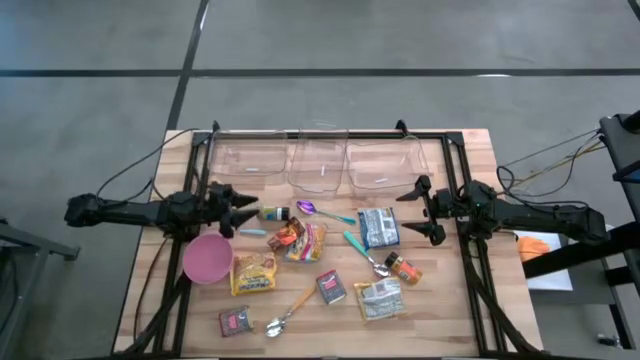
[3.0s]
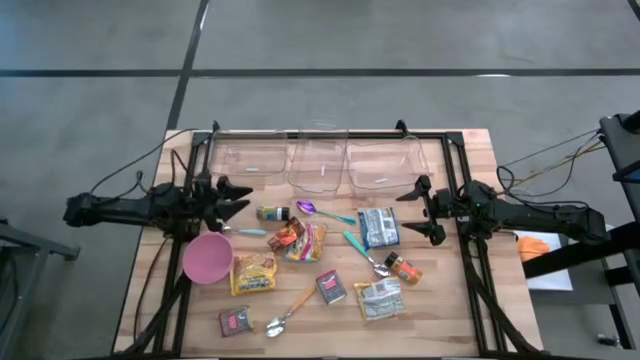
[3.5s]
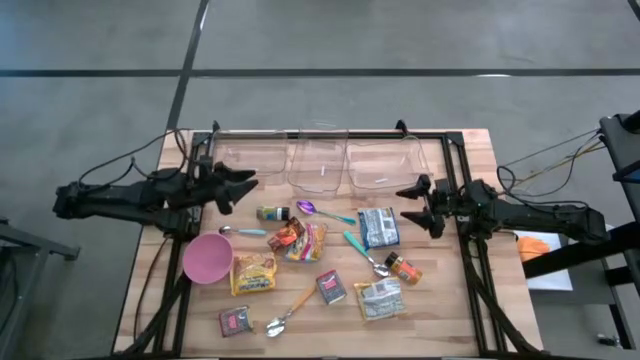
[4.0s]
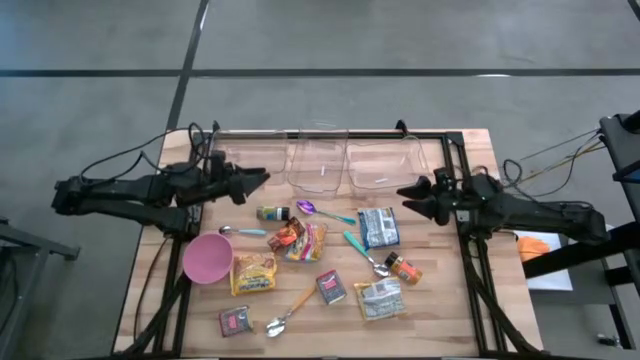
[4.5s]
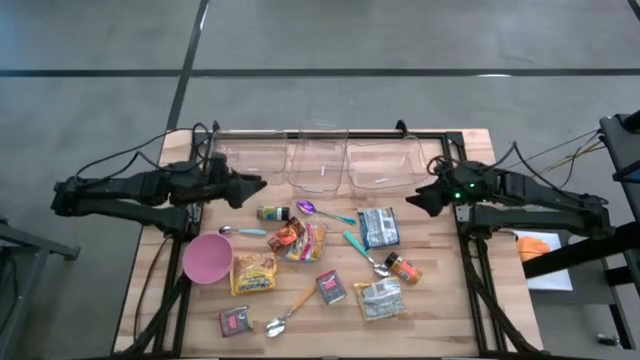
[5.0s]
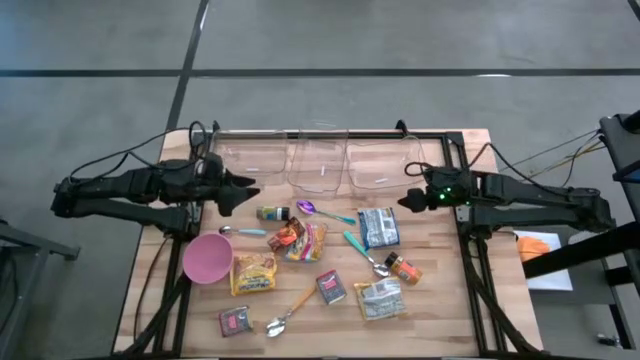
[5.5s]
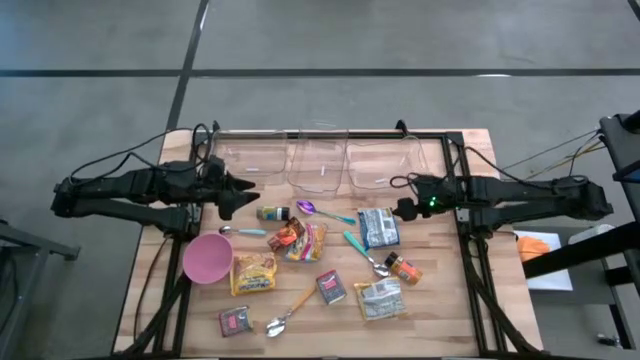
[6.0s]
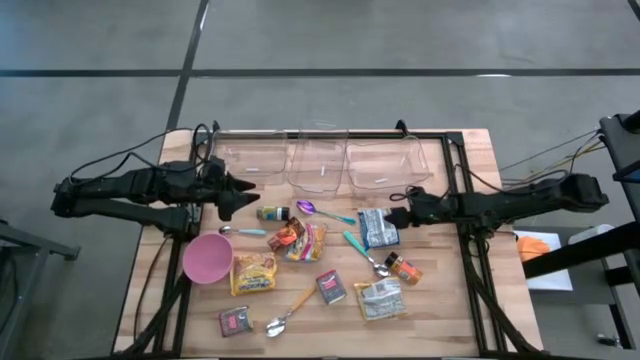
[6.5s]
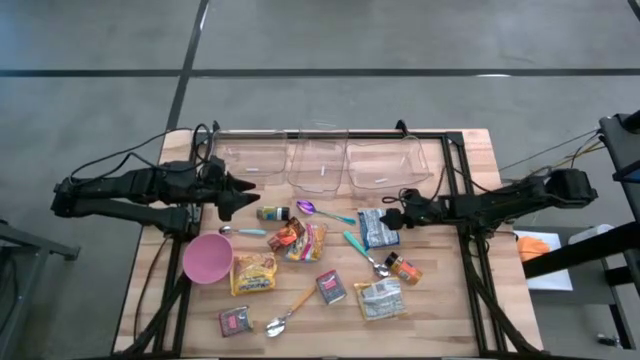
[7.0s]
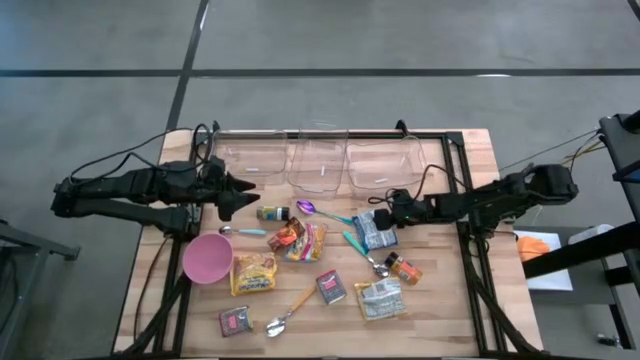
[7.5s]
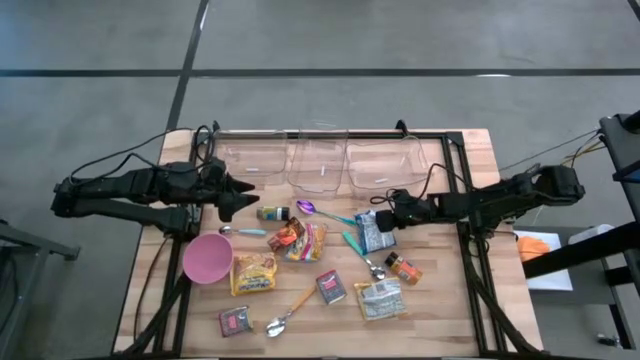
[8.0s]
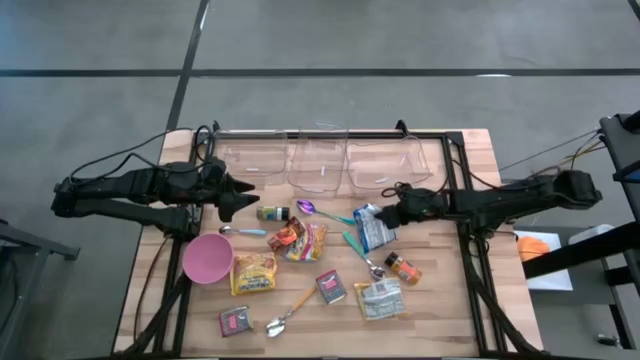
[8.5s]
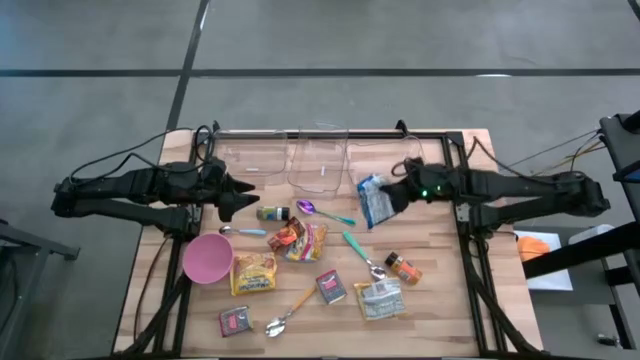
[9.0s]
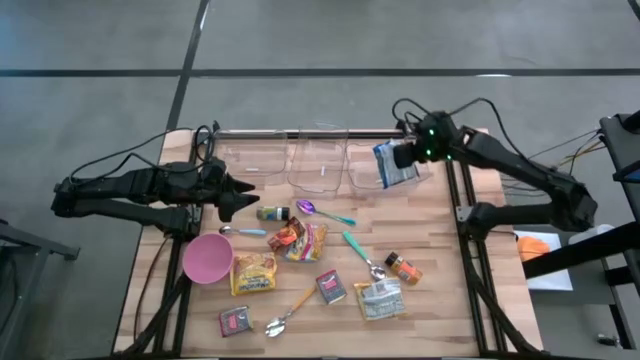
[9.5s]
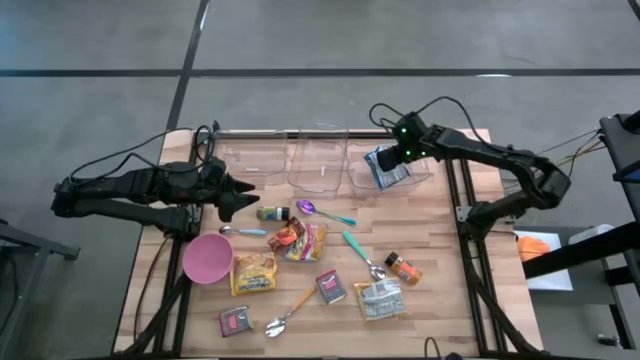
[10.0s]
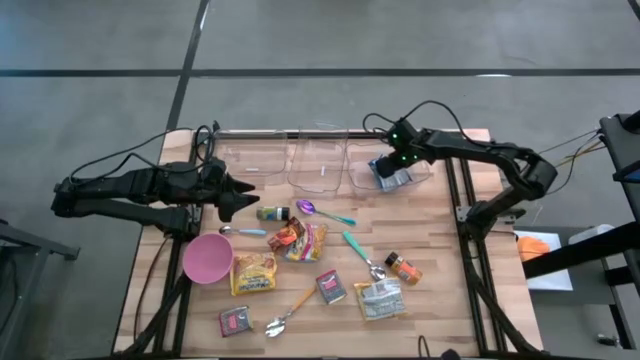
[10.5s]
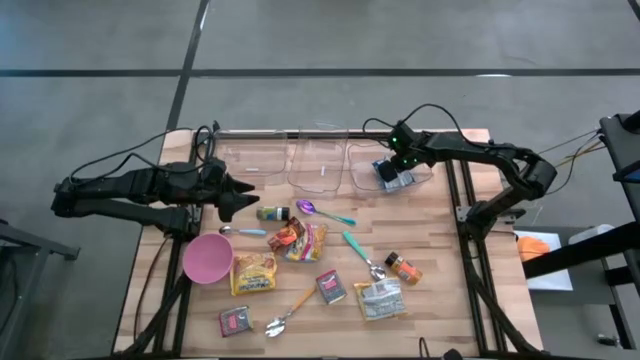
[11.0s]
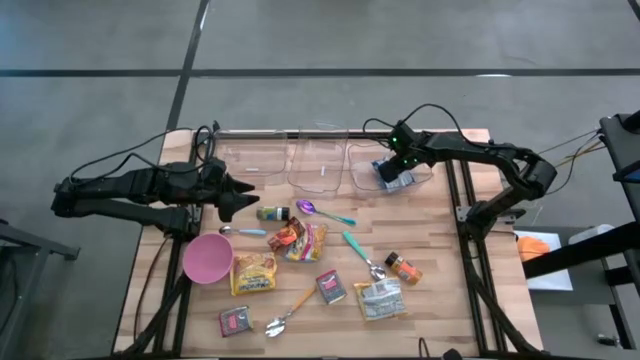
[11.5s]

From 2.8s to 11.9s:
Put the blue noodle pack into the right transparent bin

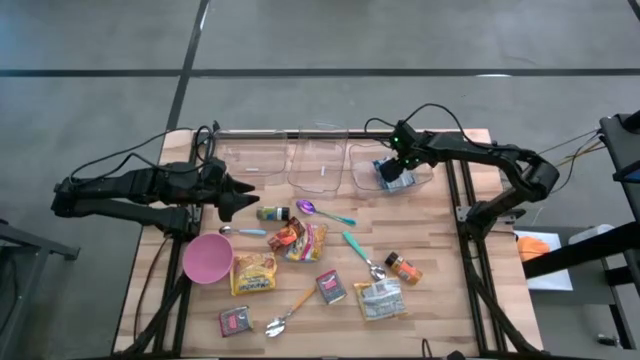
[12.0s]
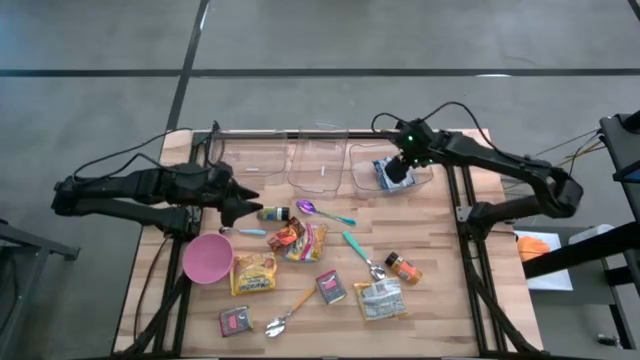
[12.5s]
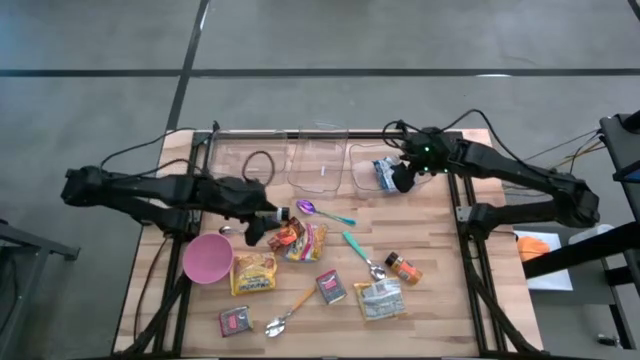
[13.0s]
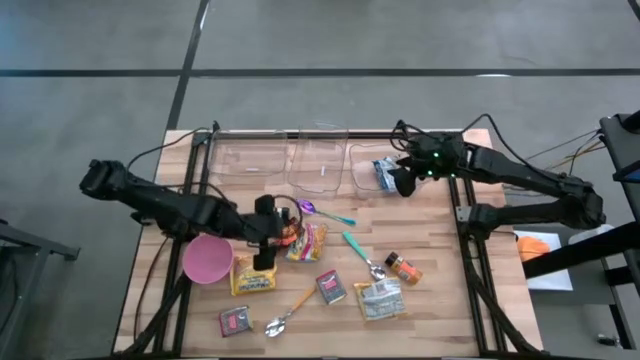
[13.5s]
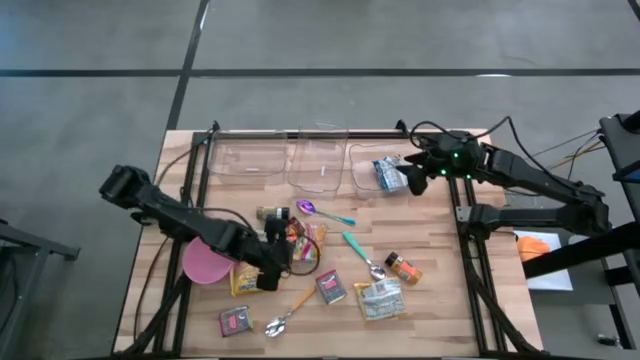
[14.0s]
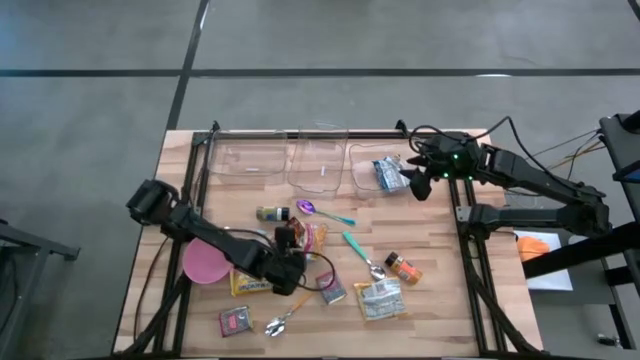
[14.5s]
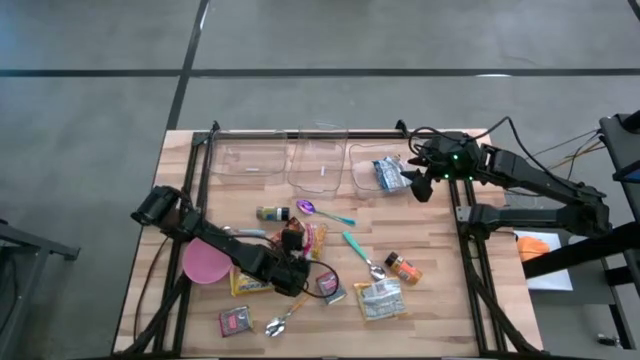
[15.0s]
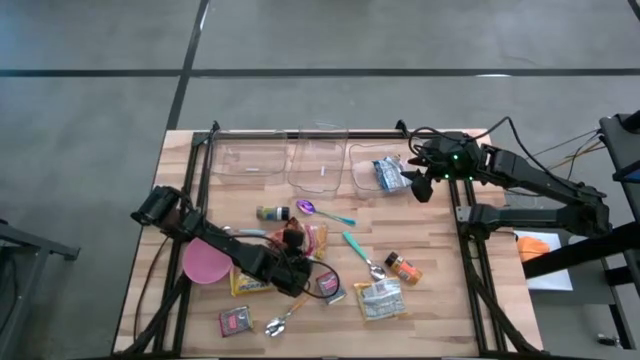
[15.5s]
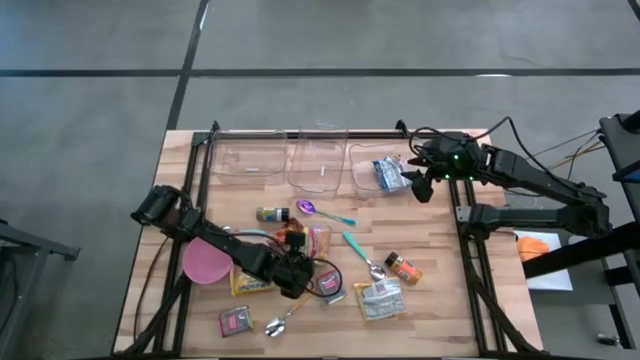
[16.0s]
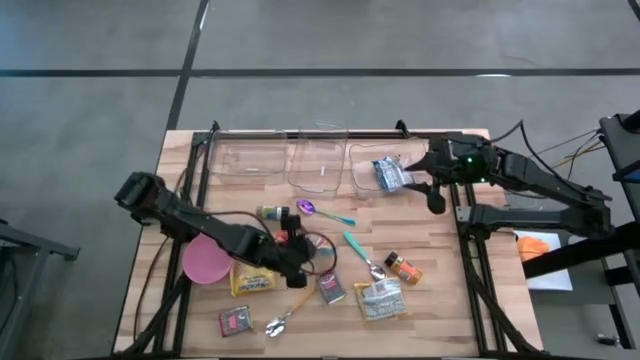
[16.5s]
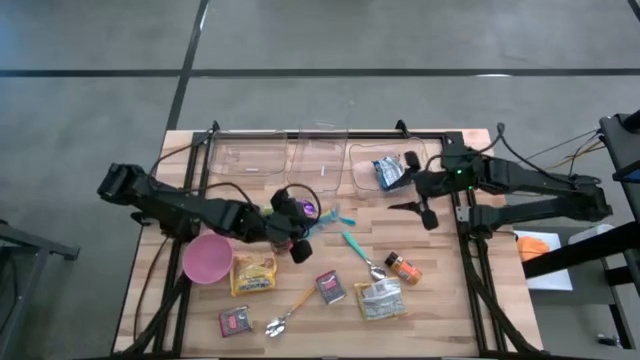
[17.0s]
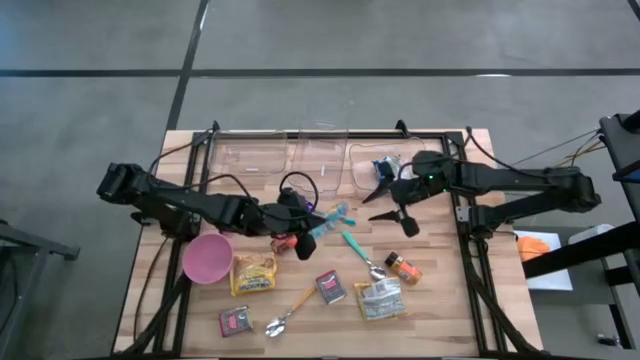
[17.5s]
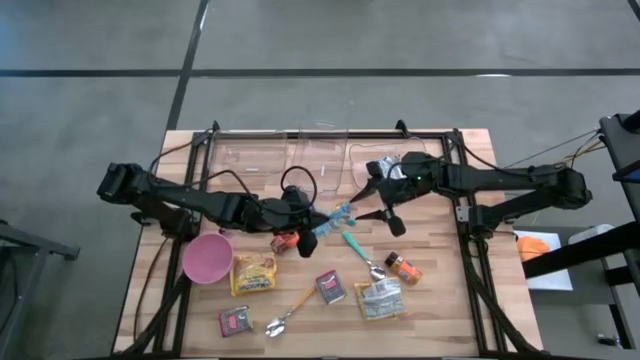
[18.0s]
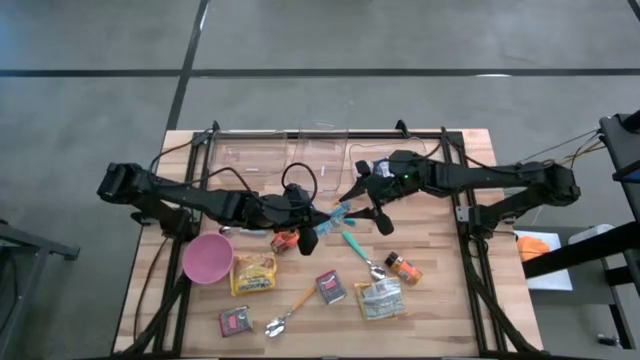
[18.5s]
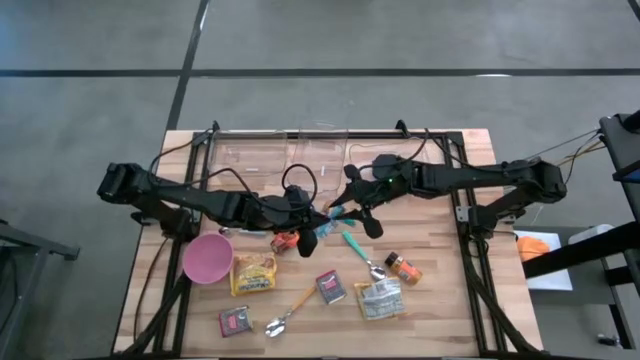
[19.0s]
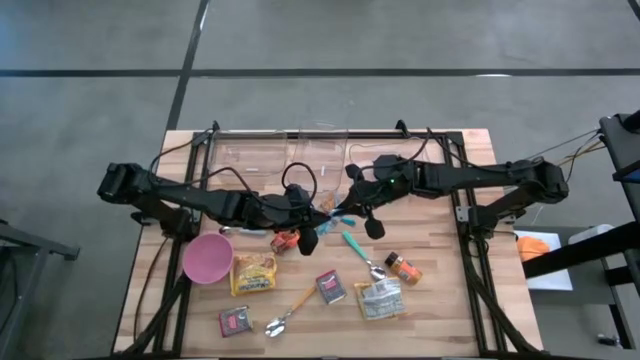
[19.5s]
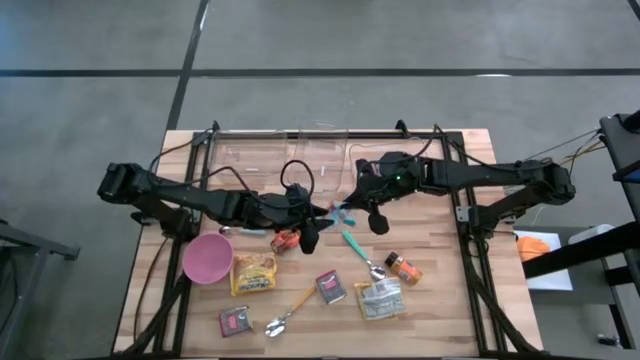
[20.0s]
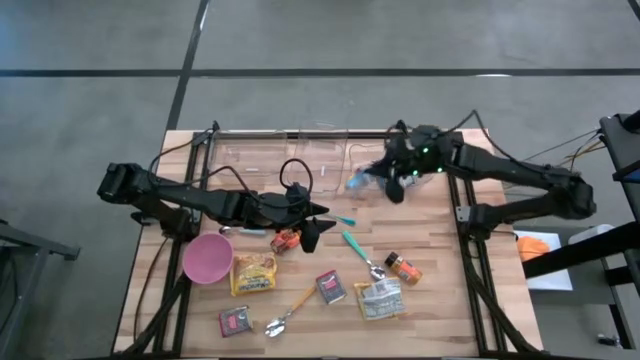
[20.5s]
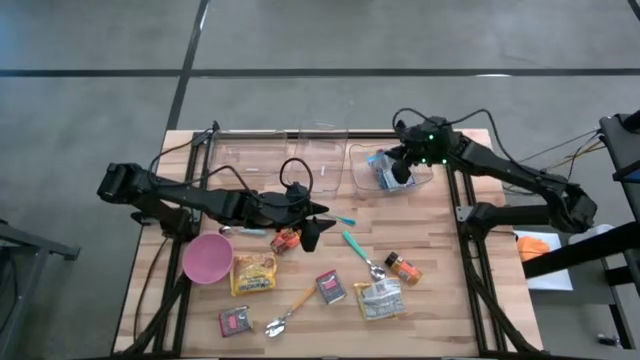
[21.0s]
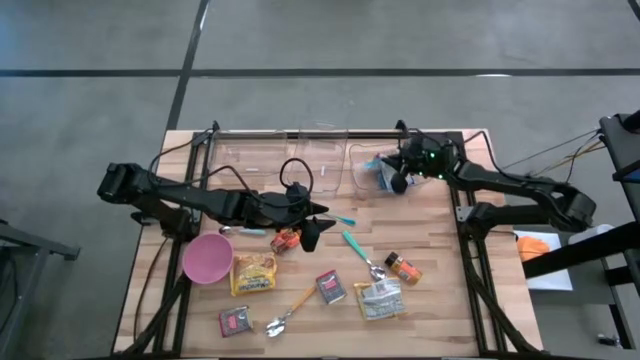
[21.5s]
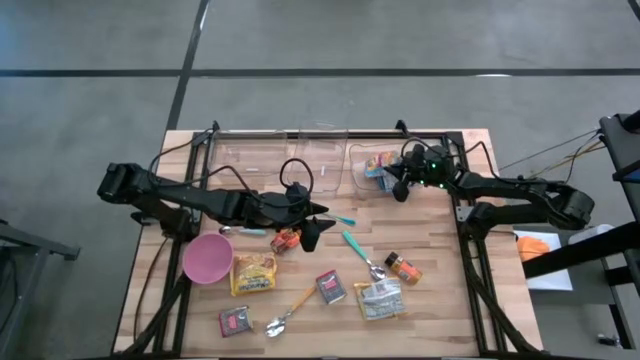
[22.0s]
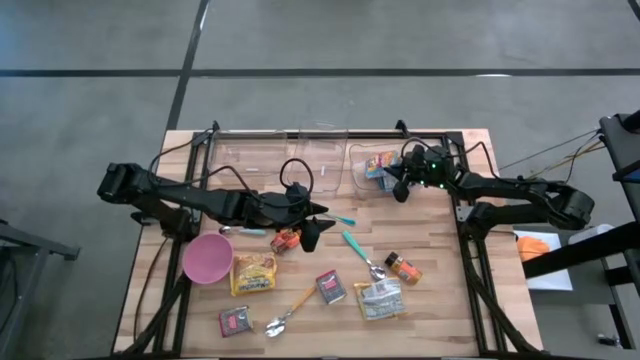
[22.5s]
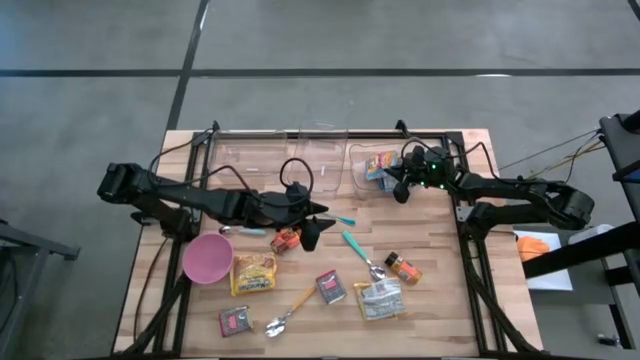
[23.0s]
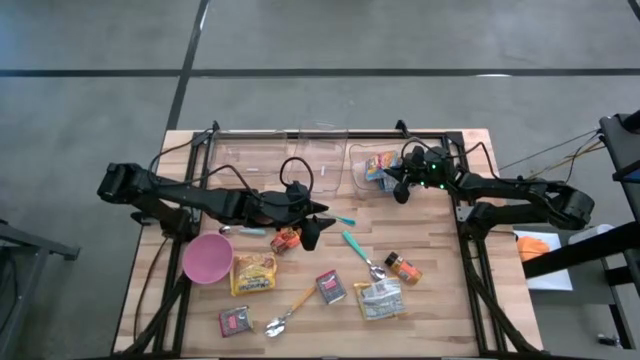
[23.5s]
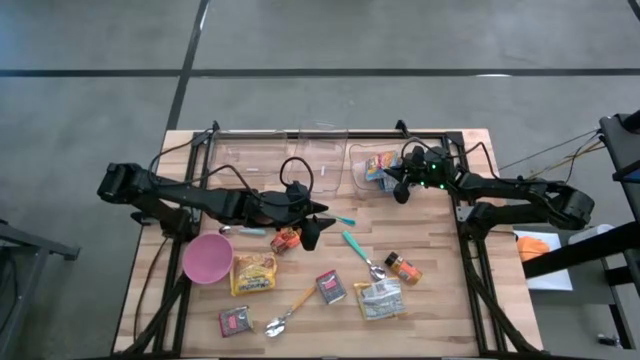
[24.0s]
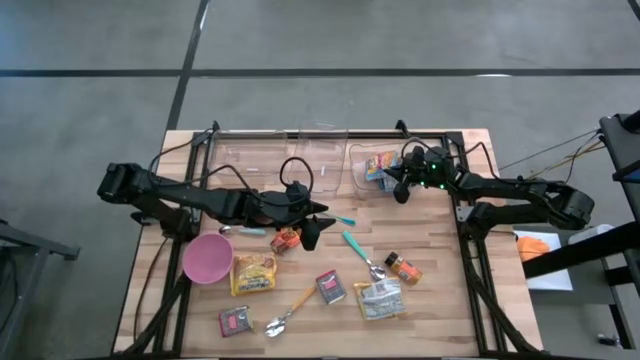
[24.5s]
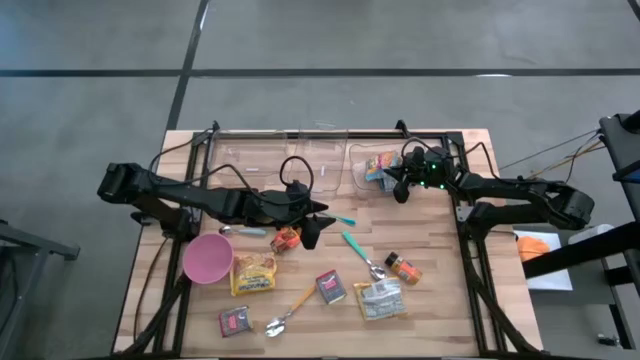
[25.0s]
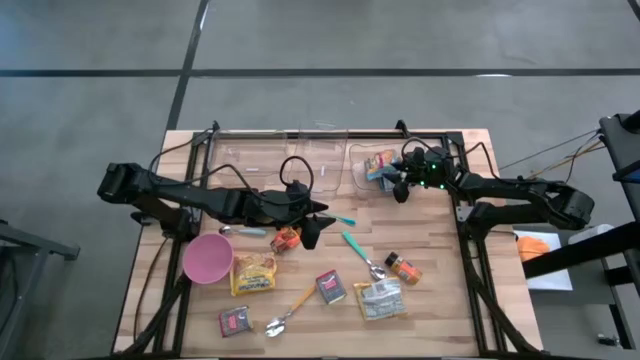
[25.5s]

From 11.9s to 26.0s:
Put the light yellow noodle pack into the right transparent bin
